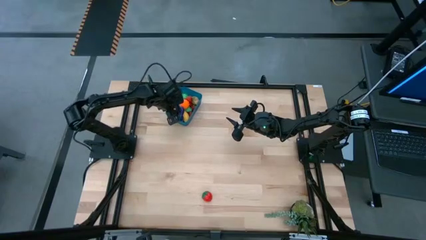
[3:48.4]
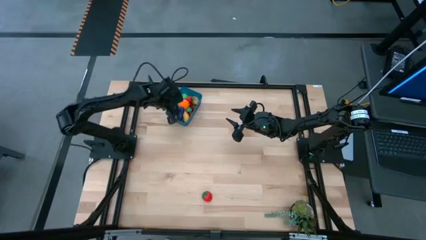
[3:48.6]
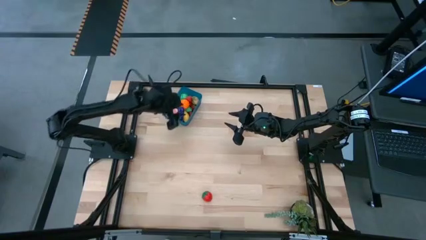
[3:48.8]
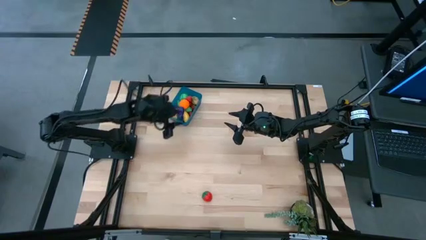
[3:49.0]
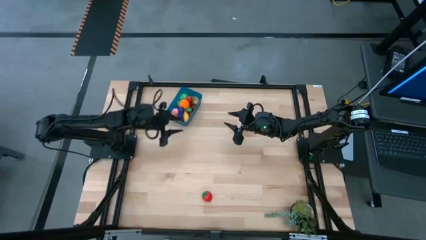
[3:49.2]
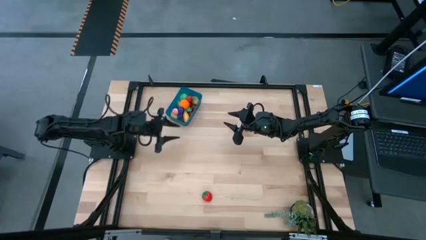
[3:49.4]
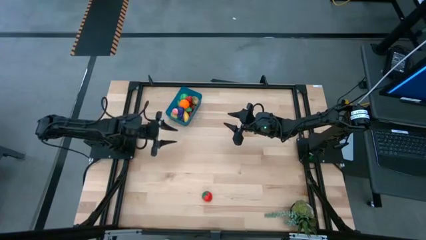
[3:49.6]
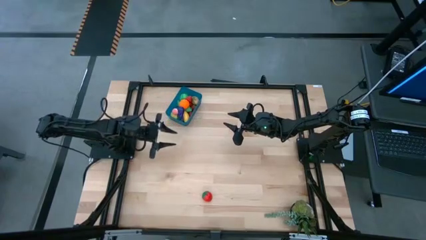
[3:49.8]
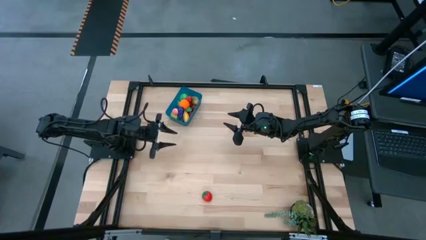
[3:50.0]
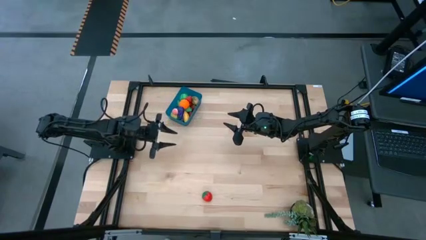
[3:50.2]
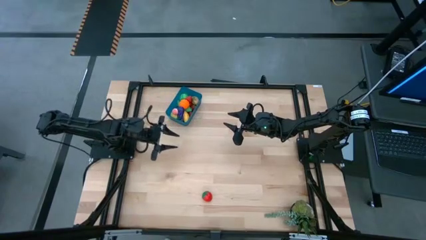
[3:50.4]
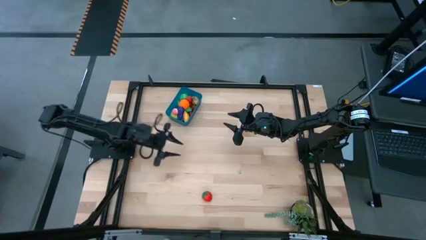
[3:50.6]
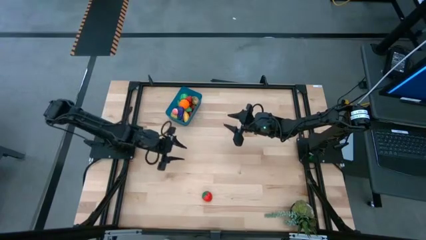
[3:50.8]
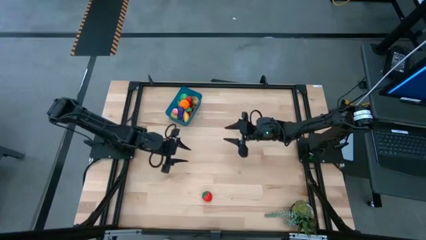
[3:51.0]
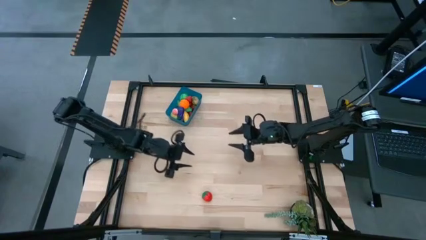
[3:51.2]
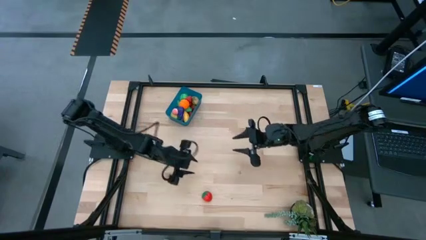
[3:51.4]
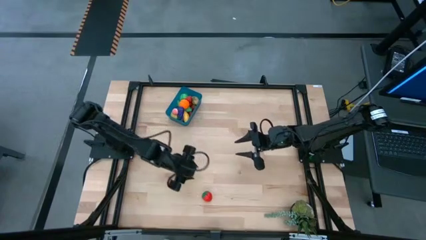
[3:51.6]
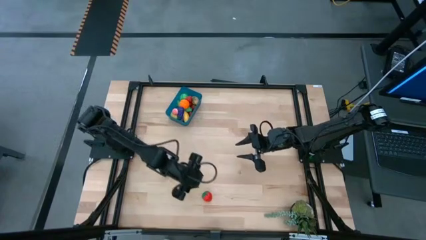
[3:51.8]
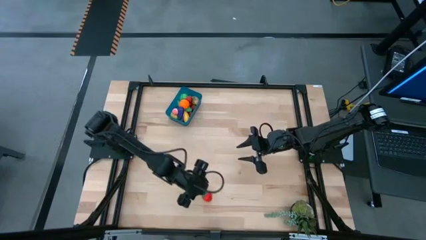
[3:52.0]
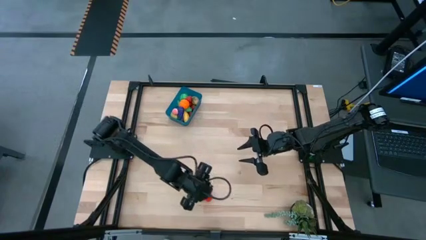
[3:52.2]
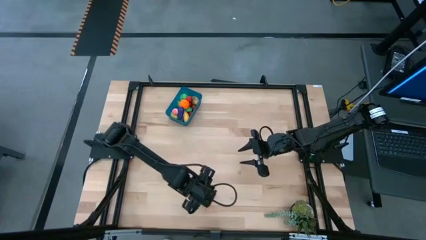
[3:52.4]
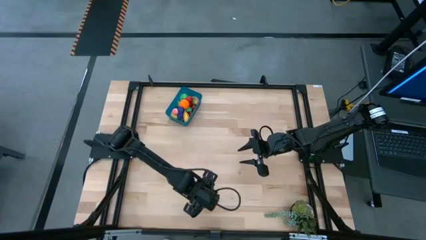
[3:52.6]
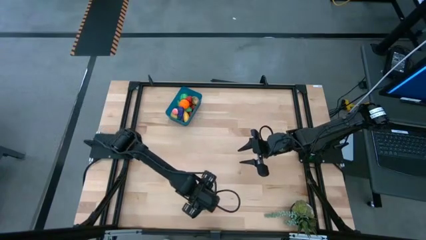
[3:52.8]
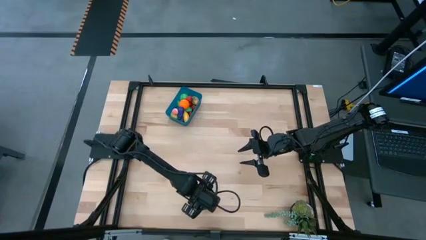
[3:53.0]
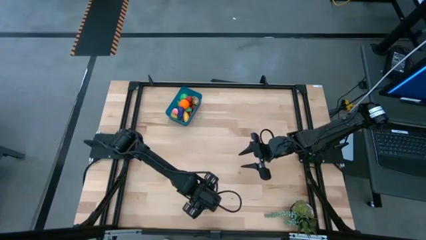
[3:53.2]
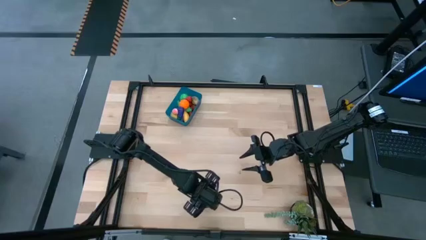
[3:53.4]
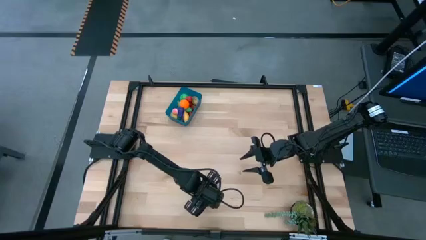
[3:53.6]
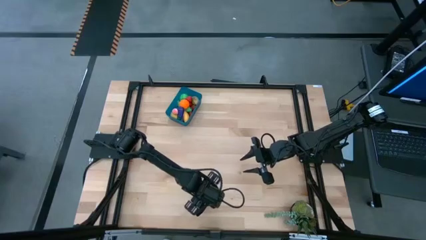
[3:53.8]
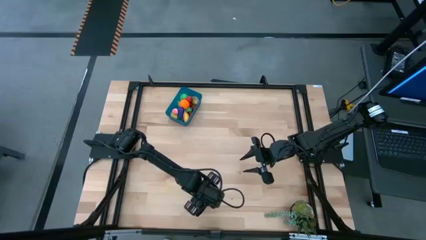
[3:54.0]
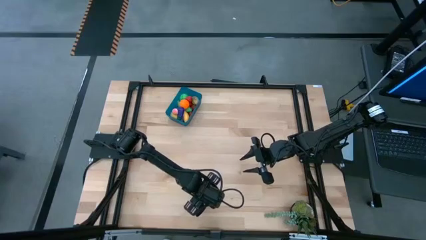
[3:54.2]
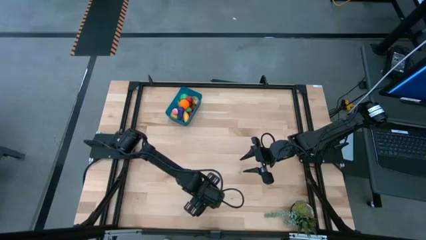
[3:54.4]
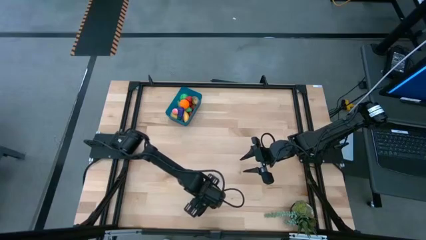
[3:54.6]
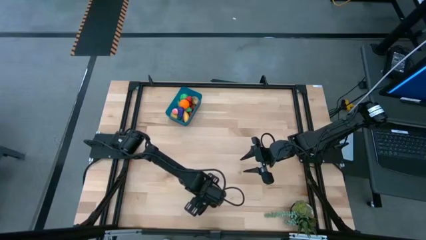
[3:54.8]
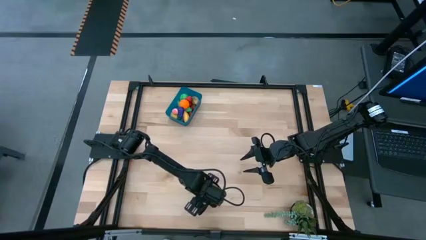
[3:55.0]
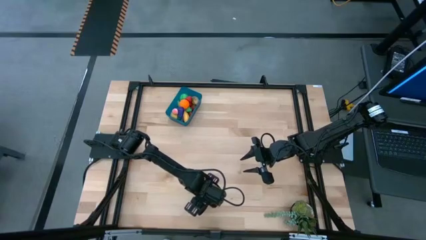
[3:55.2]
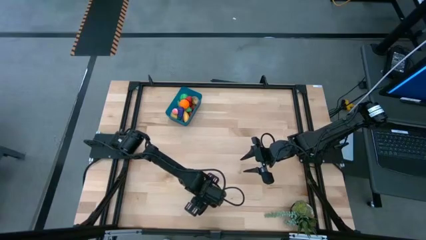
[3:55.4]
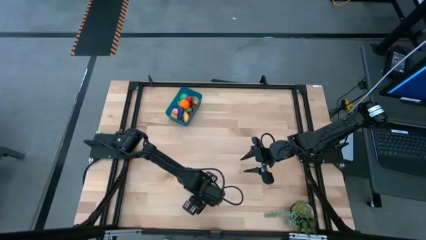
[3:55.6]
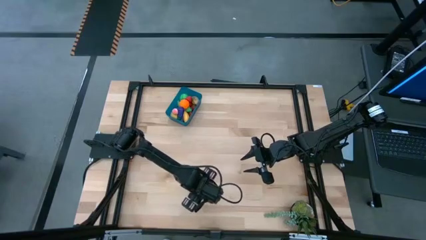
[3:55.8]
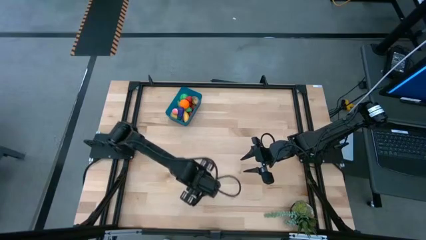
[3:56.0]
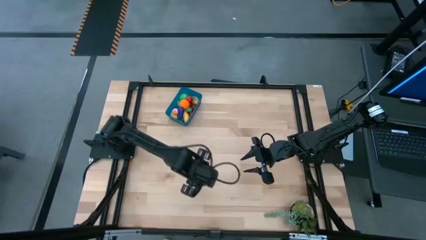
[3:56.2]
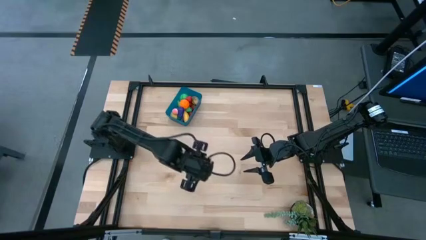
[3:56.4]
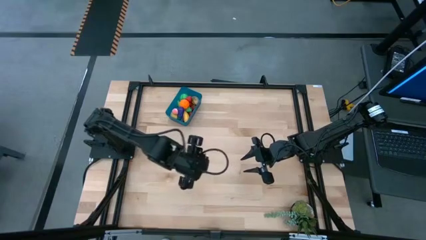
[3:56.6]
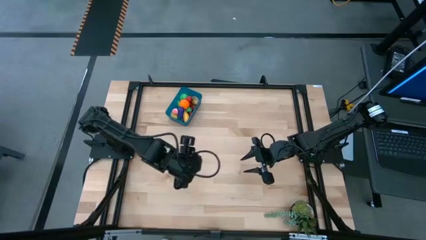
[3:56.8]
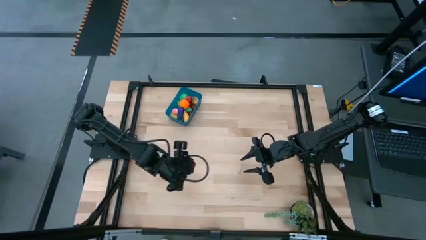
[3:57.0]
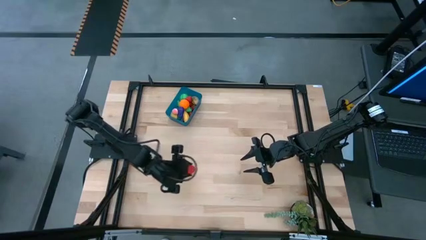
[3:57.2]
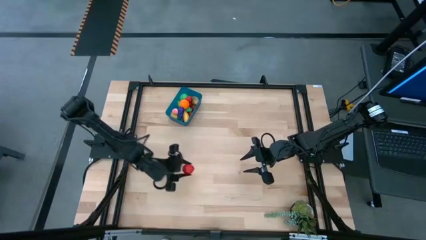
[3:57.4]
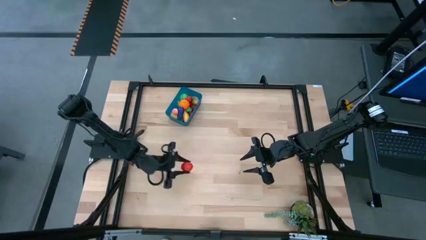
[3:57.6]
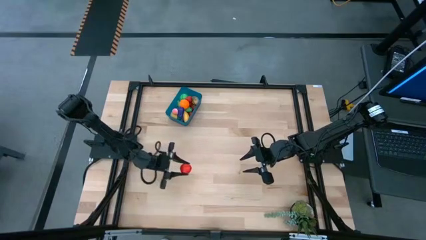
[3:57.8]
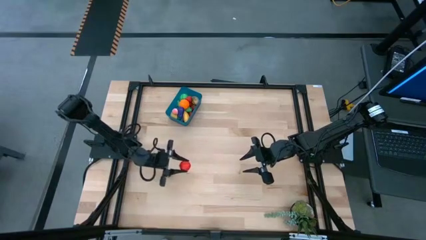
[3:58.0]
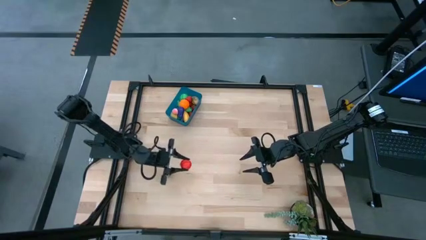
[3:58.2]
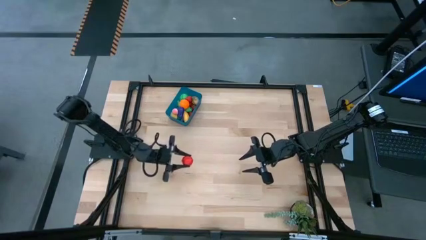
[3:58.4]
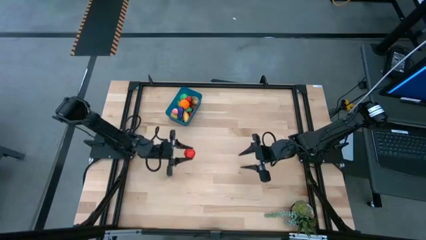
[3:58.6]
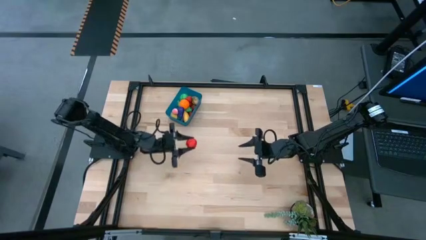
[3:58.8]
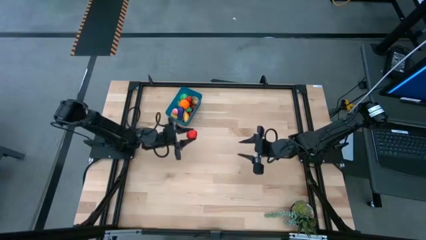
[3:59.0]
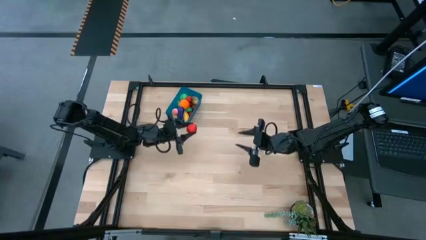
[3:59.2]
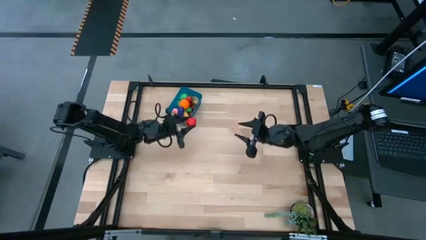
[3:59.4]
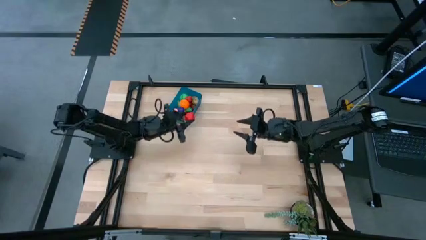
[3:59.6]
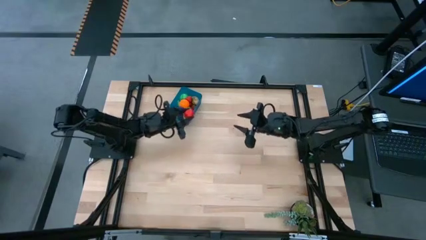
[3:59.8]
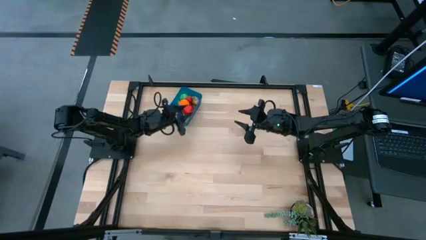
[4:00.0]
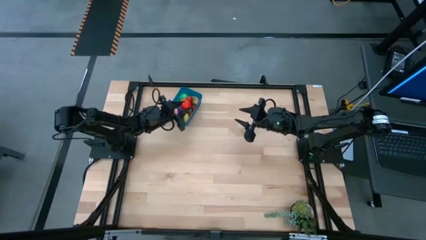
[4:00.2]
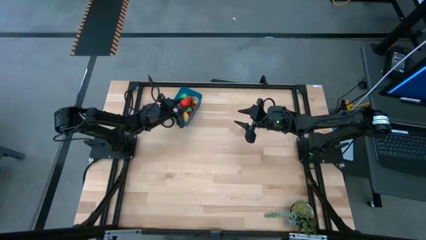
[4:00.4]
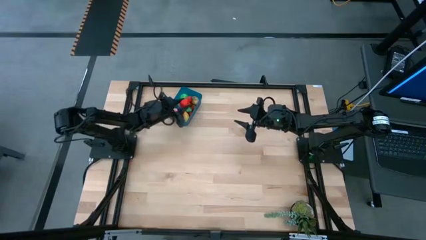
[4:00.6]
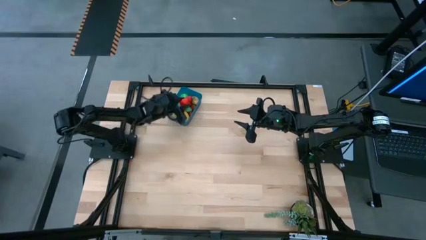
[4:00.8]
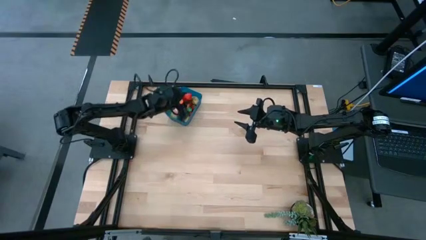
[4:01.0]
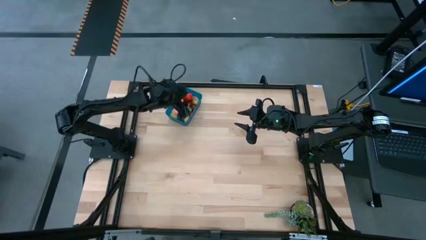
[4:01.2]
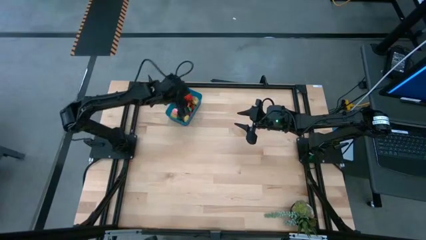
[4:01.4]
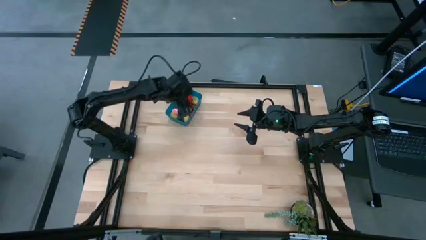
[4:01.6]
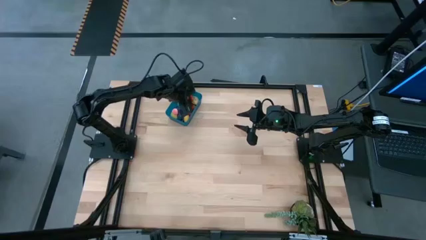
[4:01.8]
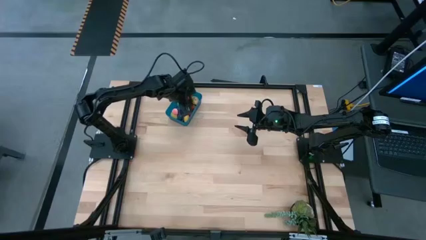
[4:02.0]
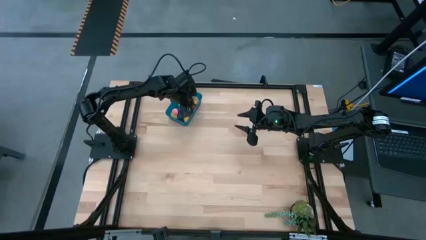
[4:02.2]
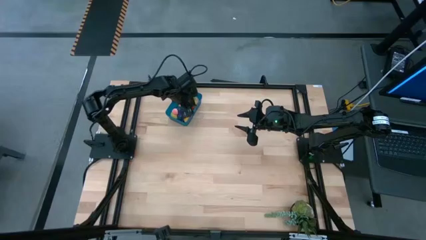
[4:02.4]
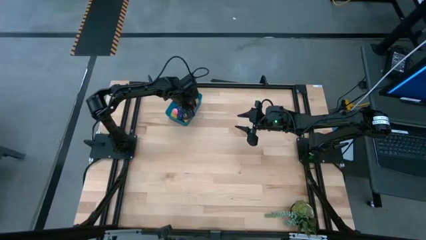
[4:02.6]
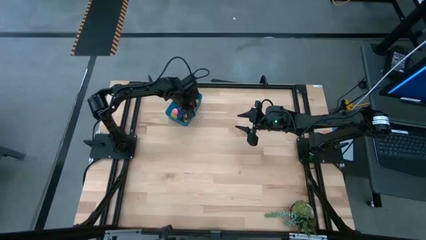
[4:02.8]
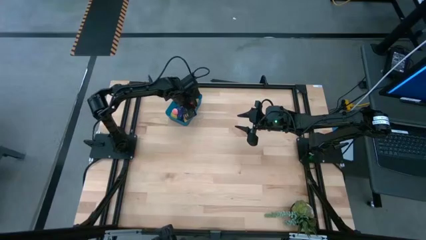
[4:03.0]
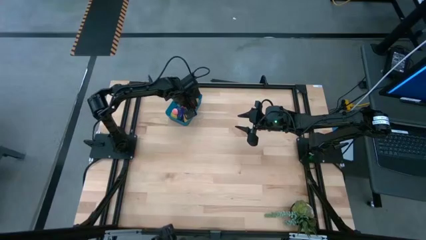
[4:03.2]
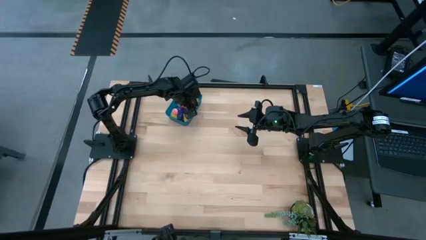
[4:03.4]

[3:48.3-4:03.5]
Task: Pick and placing Produce into tupperware
Put the red strawberry into the blue bin
